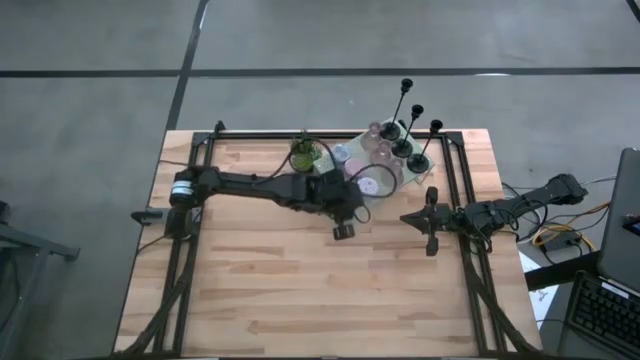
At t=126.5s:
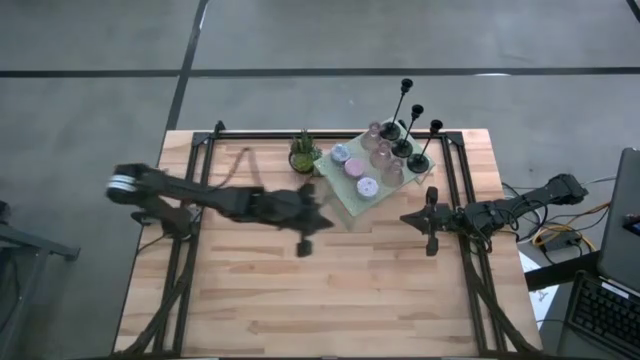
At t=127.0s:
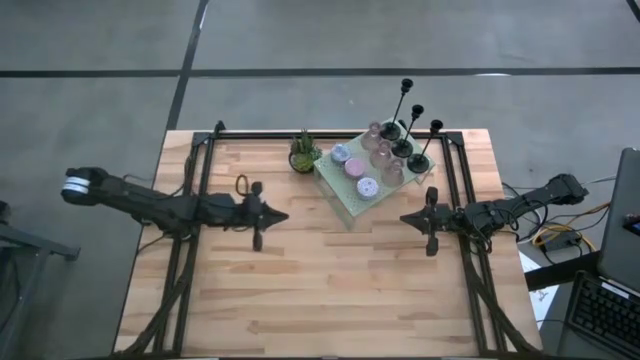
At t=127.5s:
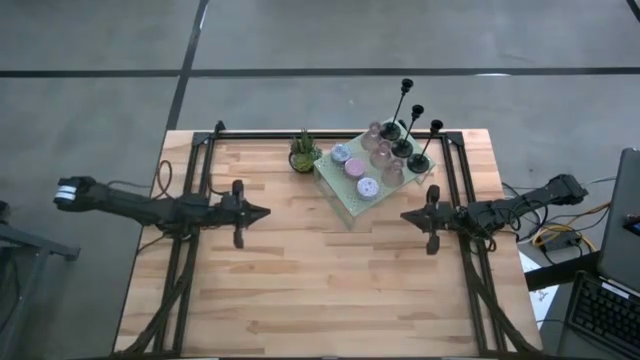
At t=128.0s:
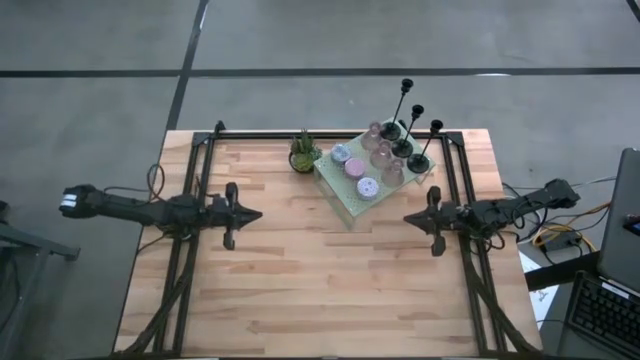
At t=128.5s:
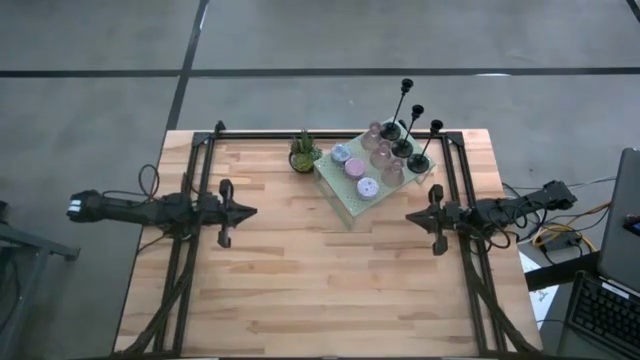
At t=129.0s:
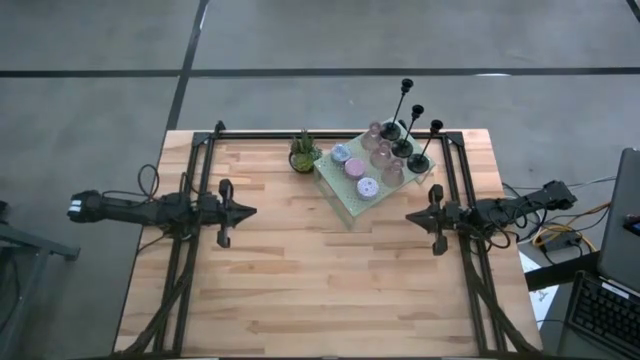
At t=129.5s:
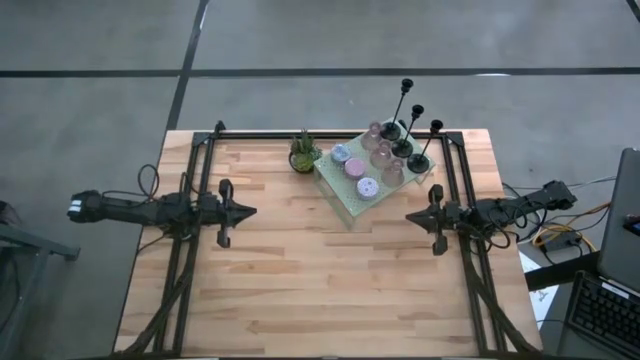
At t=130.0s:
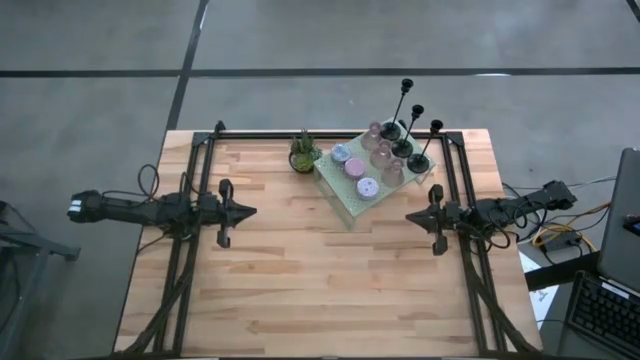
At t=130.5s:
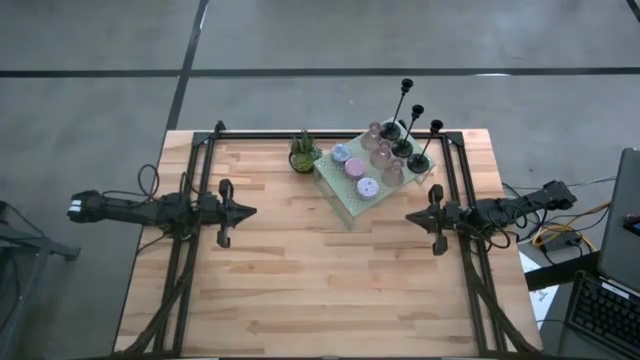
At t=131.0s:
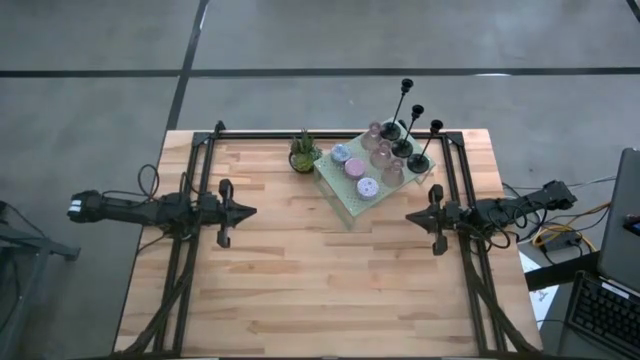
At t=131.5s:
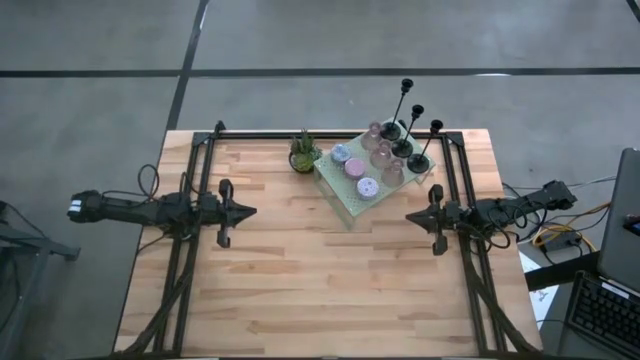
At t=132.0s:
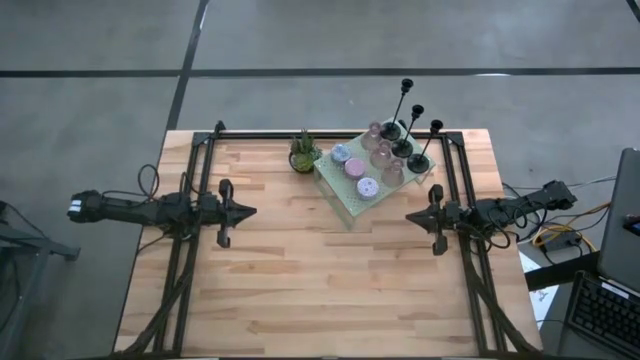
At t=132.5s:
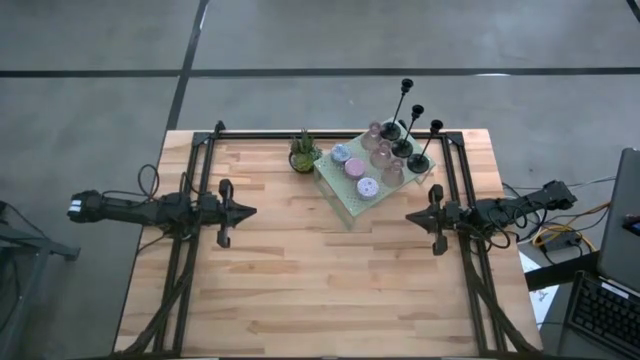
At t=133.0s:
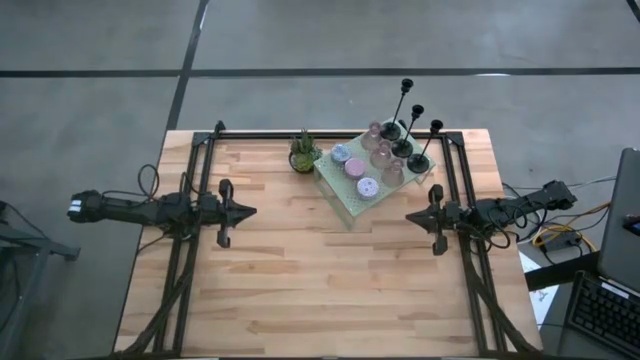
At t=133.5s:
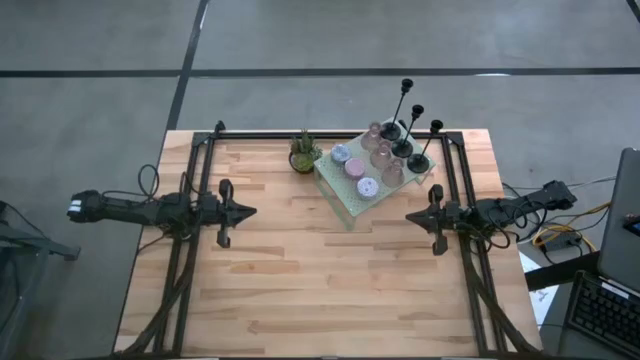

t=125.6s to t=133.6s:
Task: Pick & Place candle stick holders
Return to Home Position

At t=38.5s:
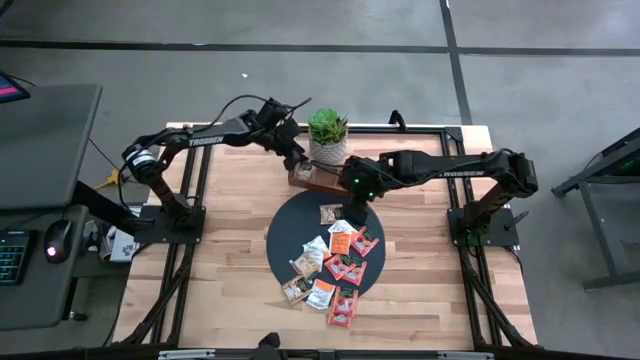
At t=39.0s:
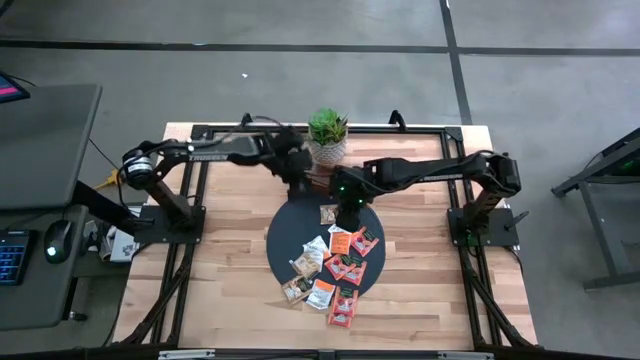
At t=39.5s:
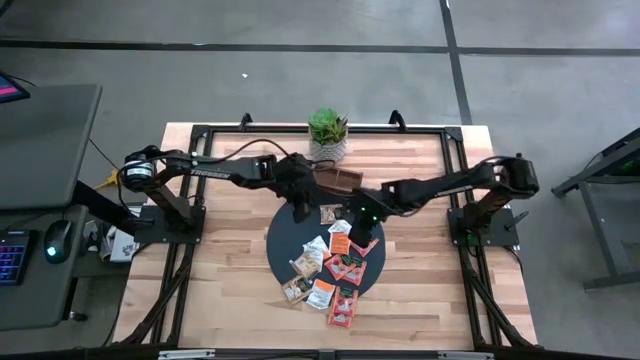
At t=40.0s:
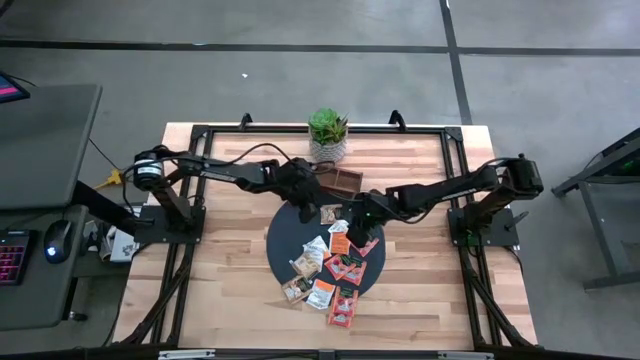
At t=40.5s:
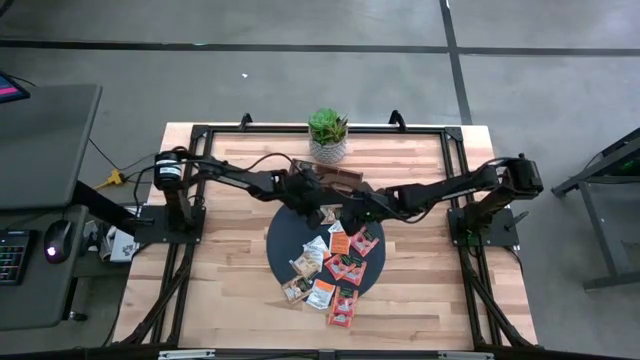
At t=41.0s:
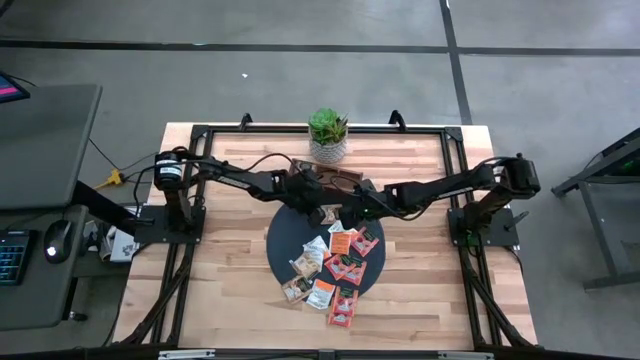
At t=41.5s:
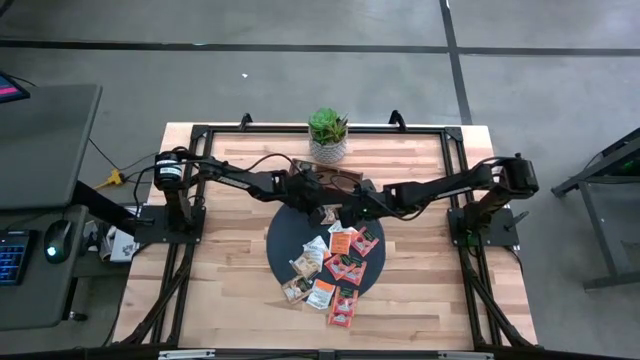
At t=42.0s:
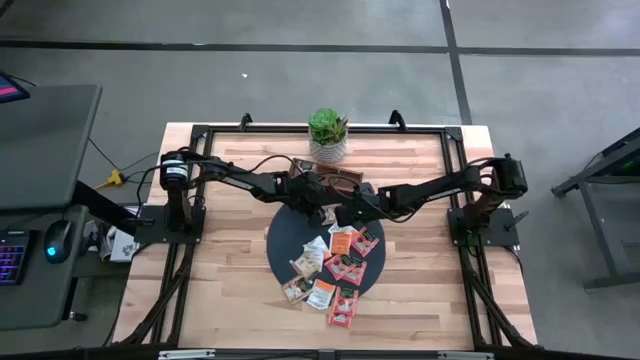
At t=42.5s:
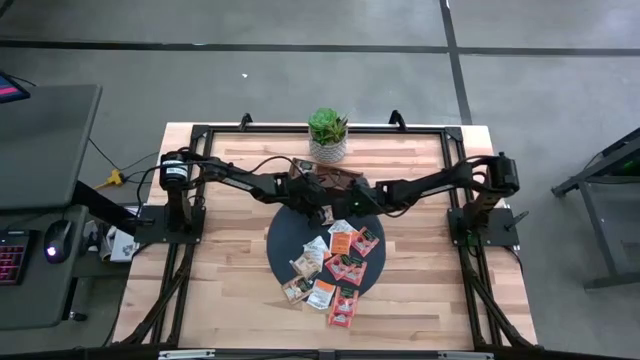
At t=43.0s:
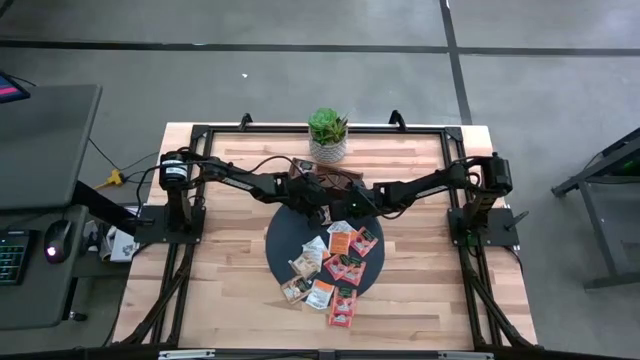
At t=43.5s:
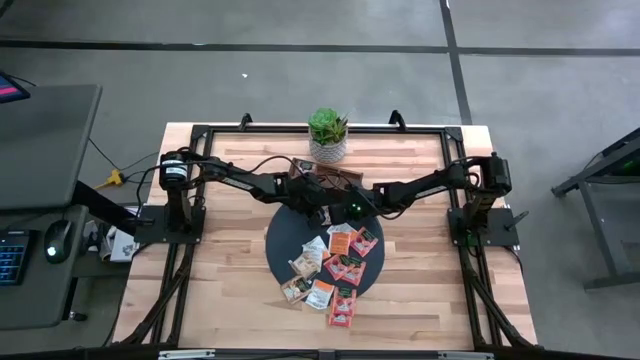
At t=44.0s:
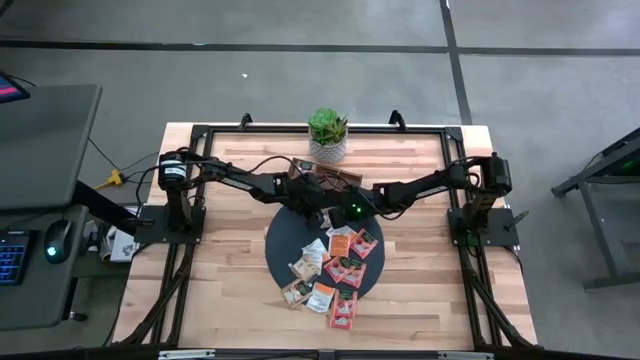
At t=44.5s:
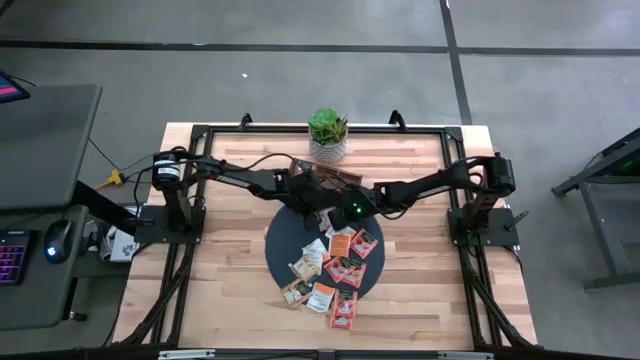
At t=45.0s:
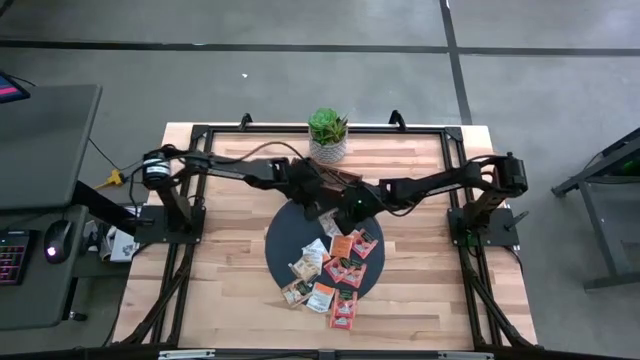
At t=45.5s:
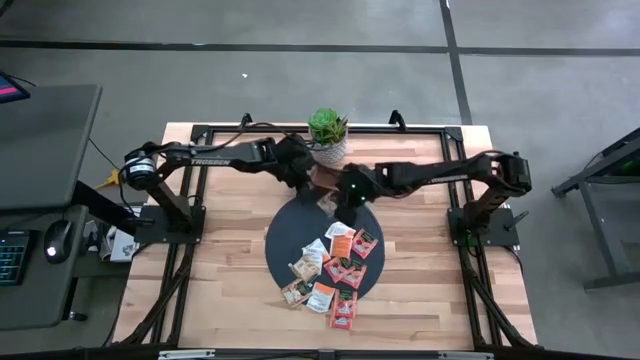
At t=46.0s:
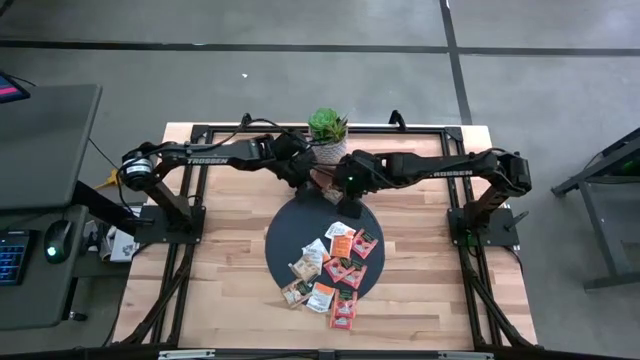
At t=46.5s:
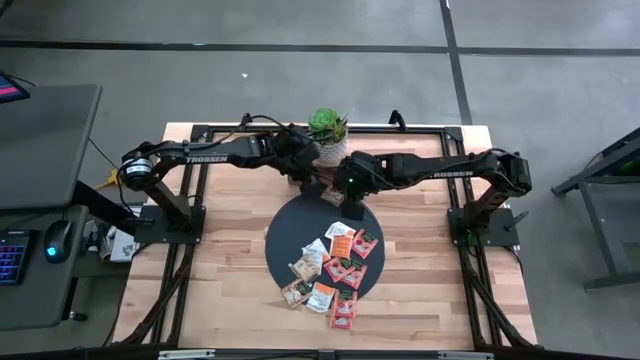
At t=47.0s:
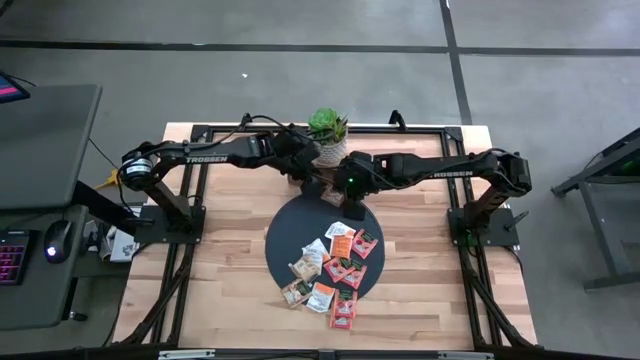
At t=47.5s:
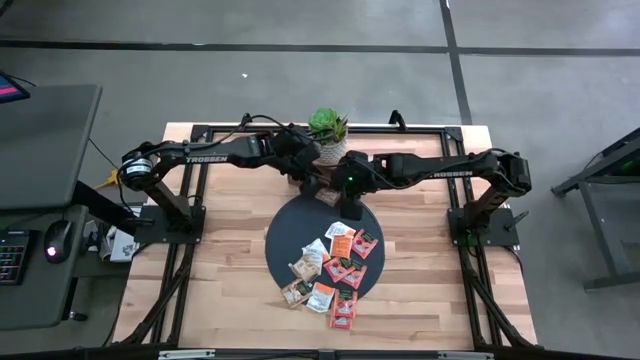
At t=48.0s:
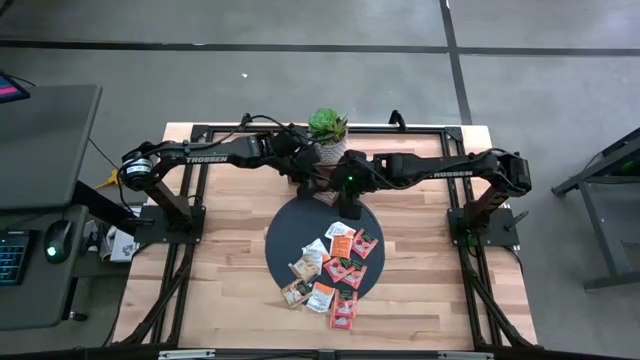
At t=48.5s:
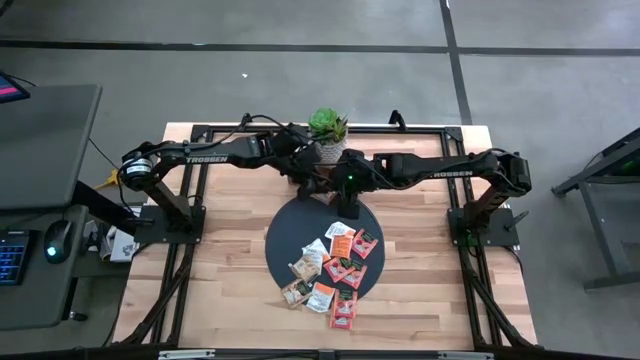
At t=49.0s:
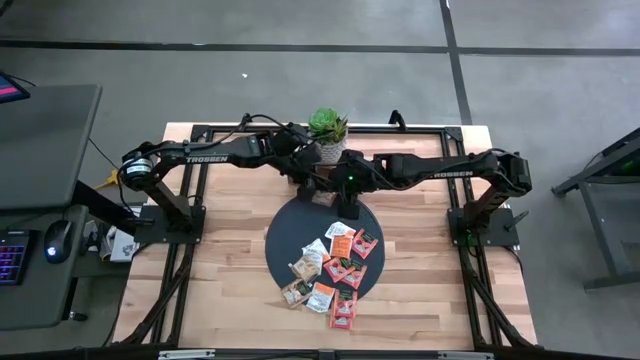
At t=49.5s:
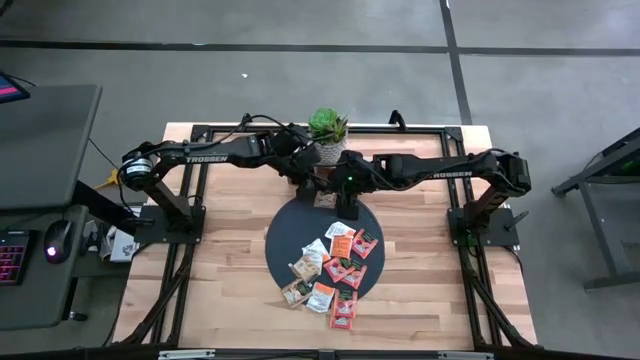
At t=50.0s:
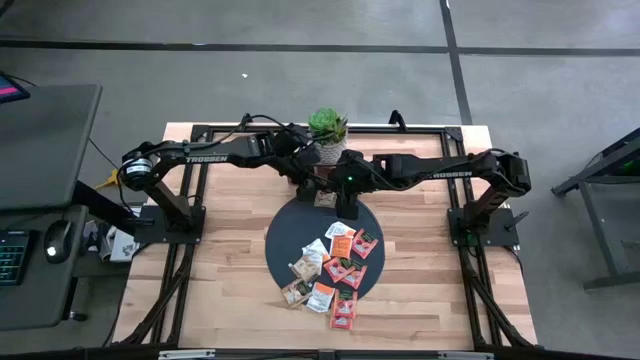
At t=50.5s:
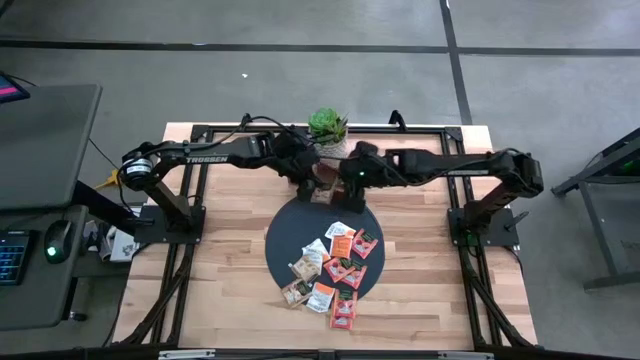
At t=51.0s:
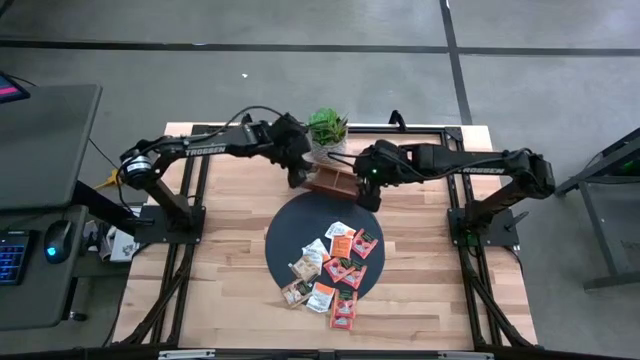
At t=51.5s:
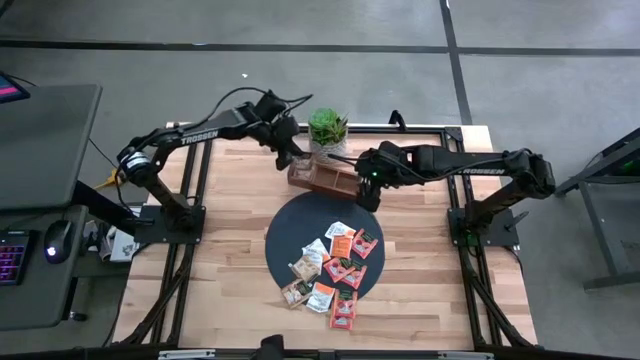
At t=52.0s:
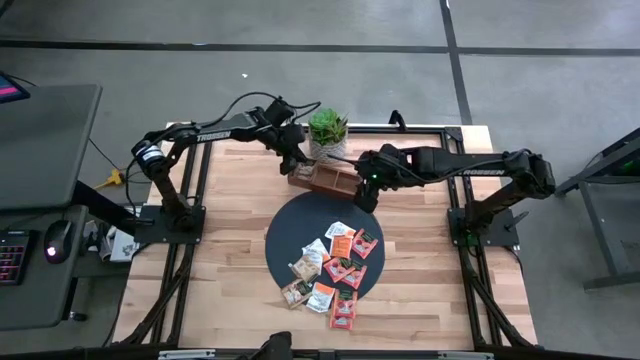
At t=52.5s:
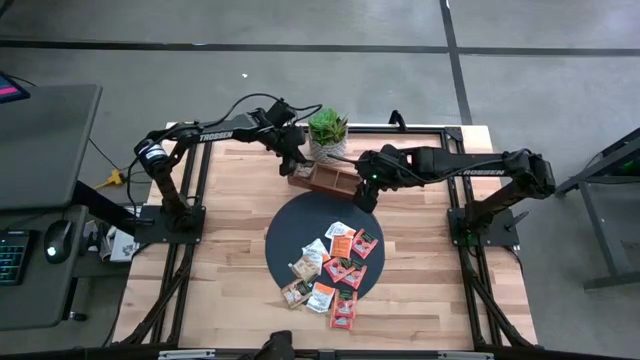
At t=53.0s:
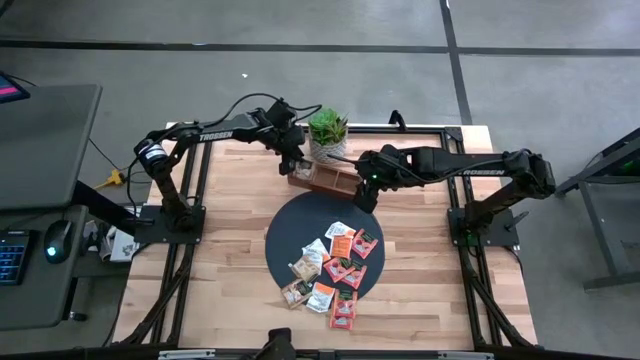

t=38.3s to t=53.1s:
Task: Pick & Place Tea
Put the brown tea bag into the left section of the wooden organizer
